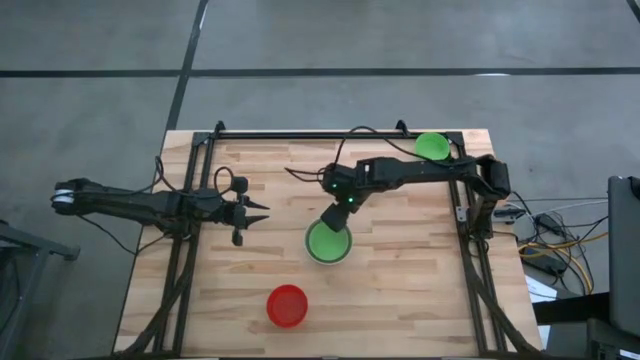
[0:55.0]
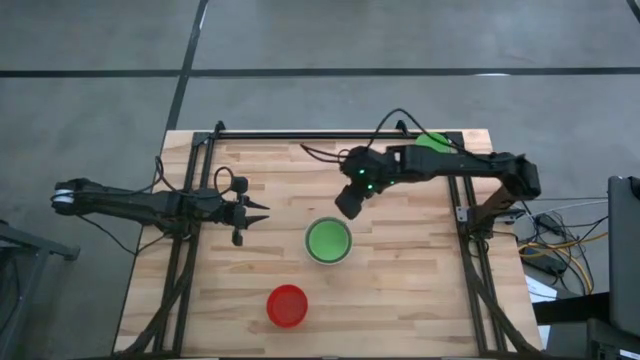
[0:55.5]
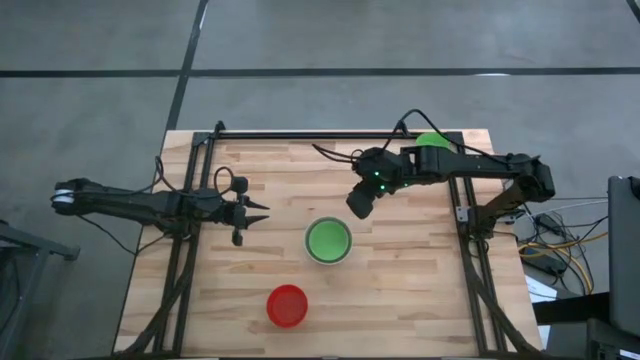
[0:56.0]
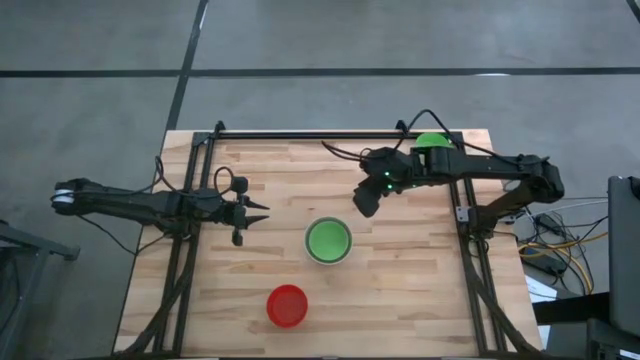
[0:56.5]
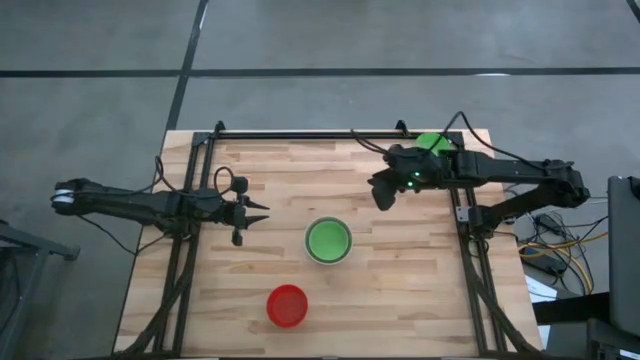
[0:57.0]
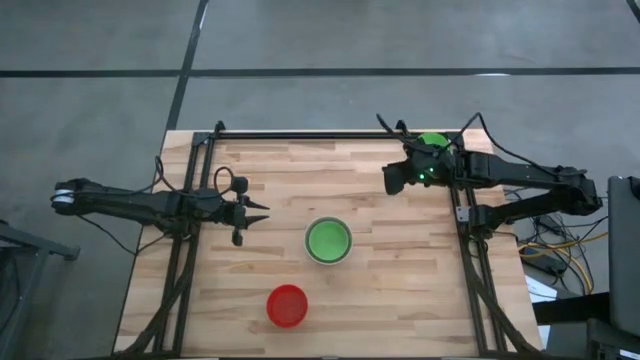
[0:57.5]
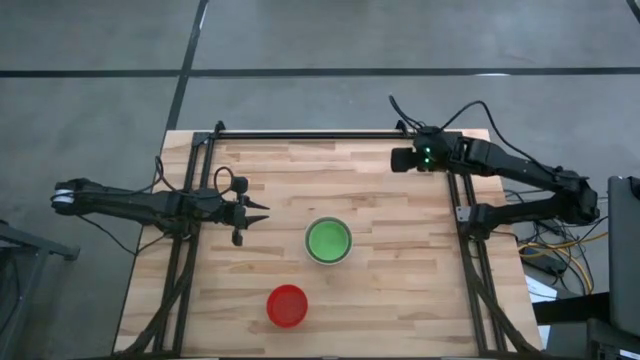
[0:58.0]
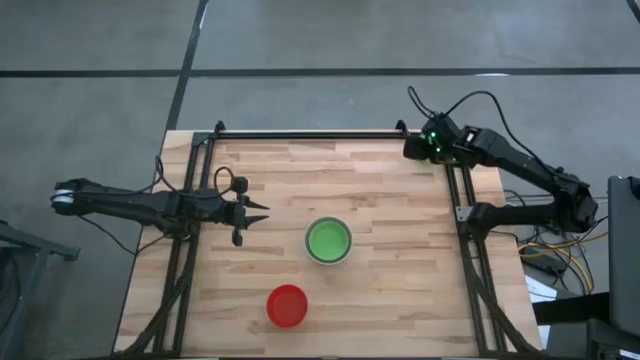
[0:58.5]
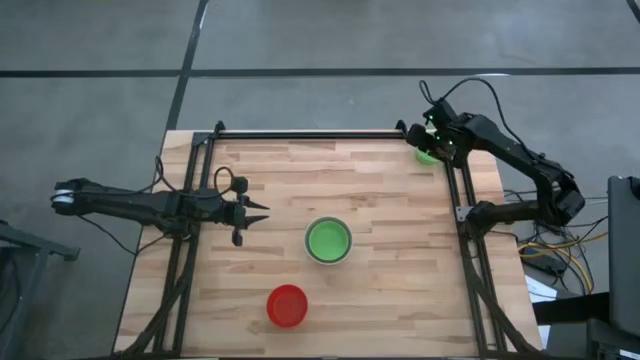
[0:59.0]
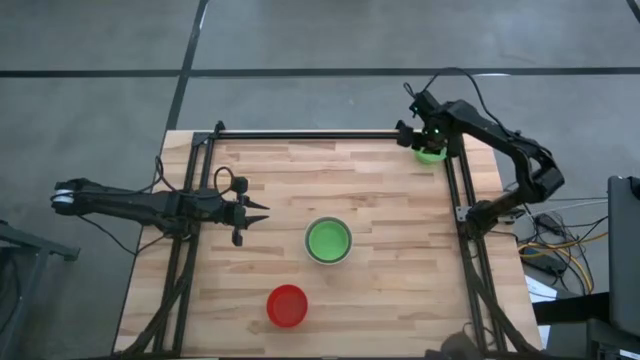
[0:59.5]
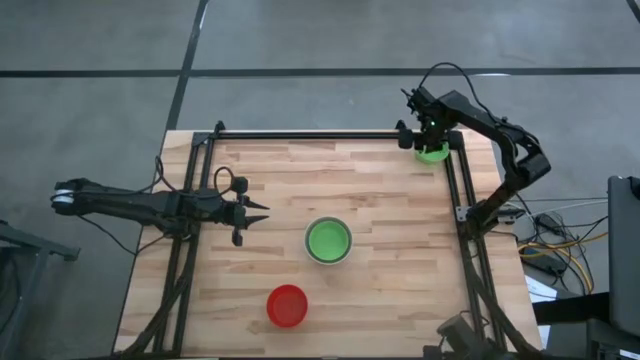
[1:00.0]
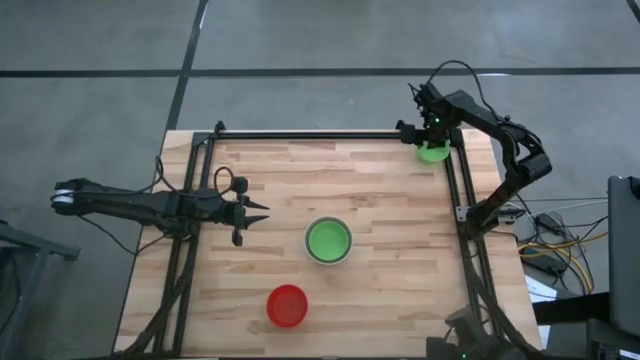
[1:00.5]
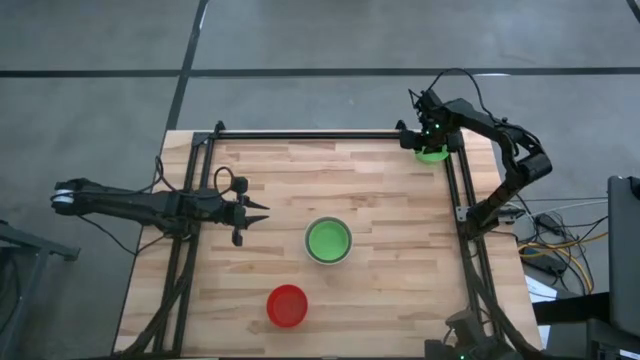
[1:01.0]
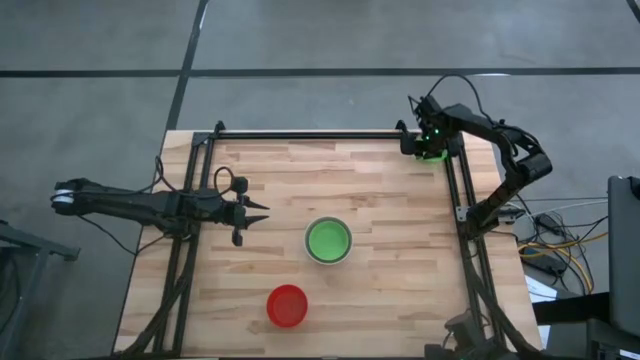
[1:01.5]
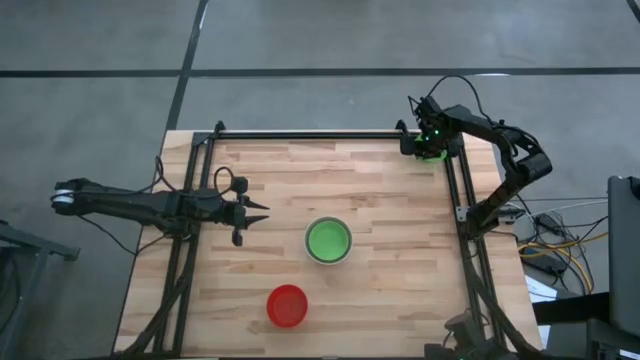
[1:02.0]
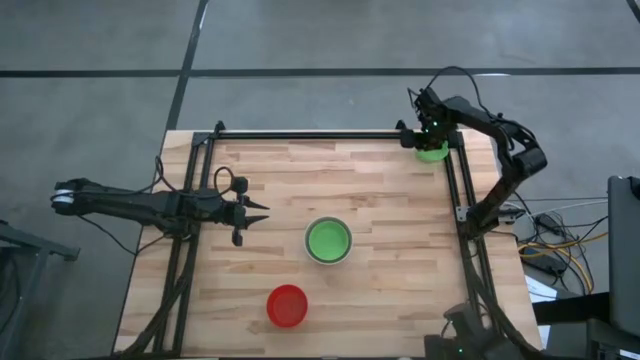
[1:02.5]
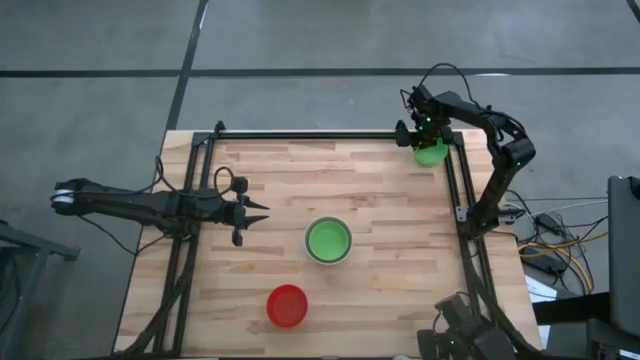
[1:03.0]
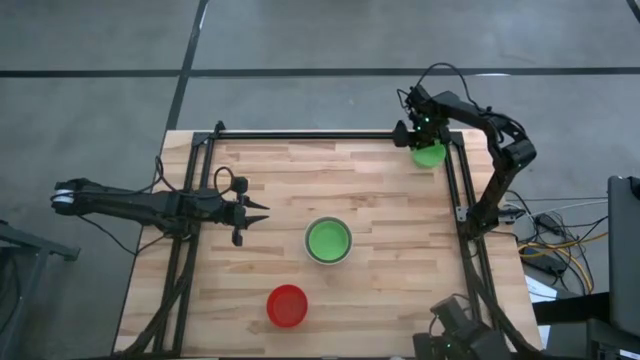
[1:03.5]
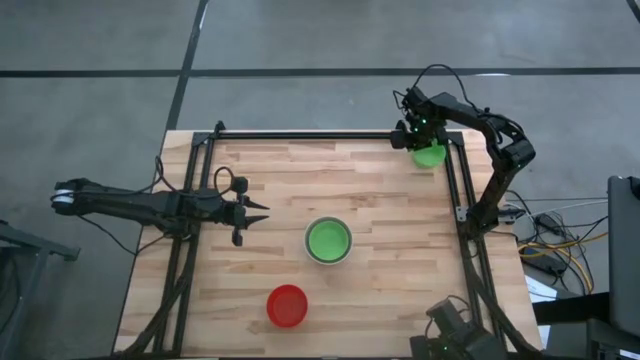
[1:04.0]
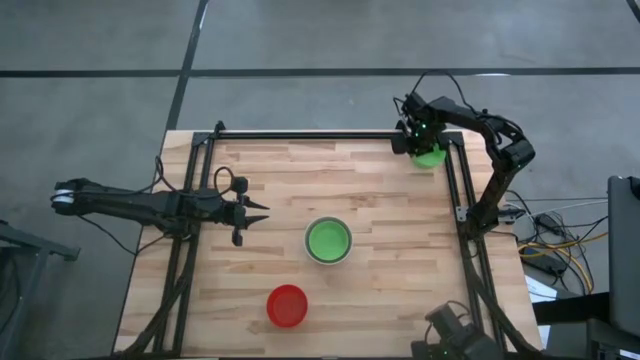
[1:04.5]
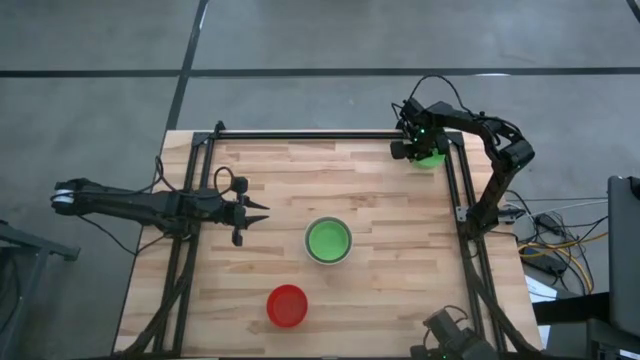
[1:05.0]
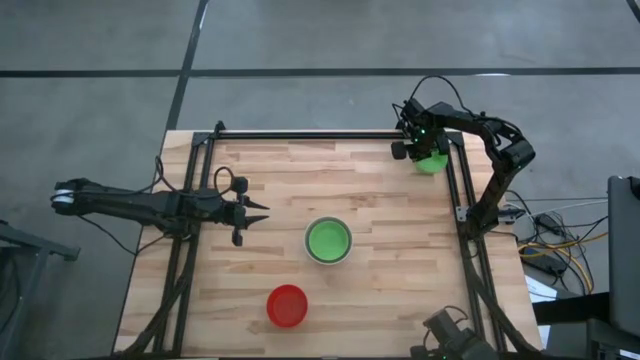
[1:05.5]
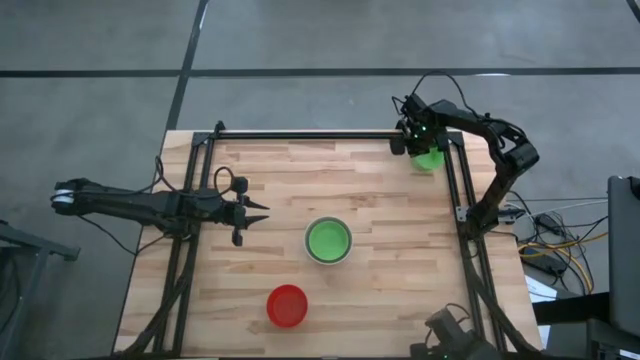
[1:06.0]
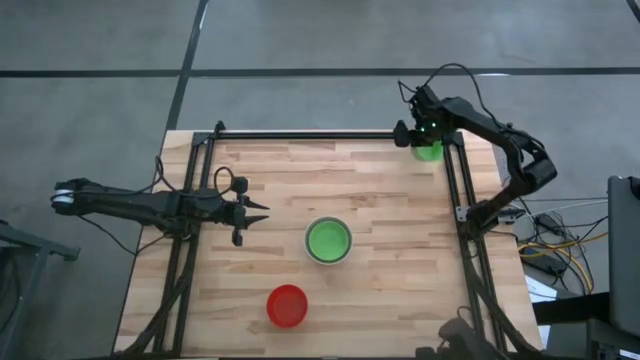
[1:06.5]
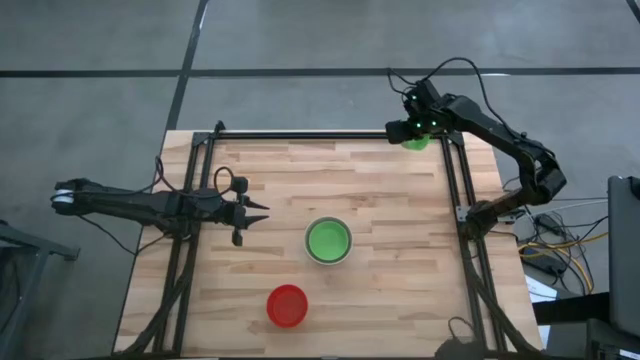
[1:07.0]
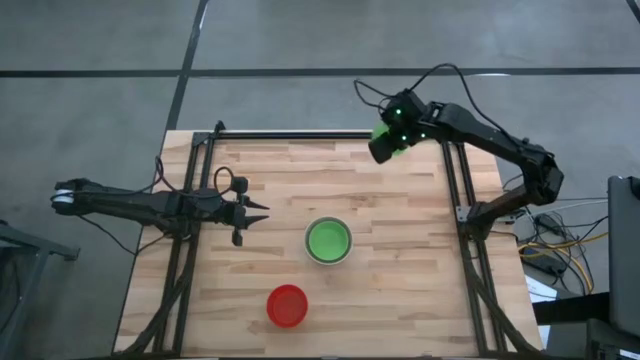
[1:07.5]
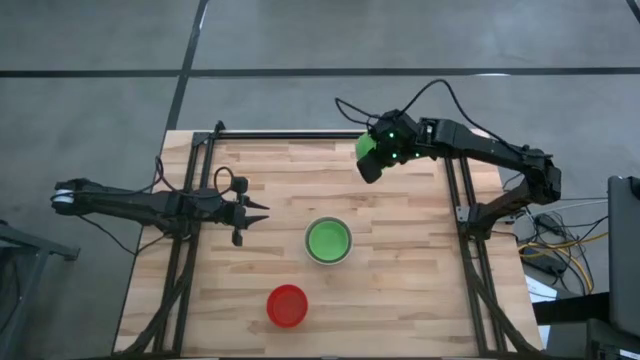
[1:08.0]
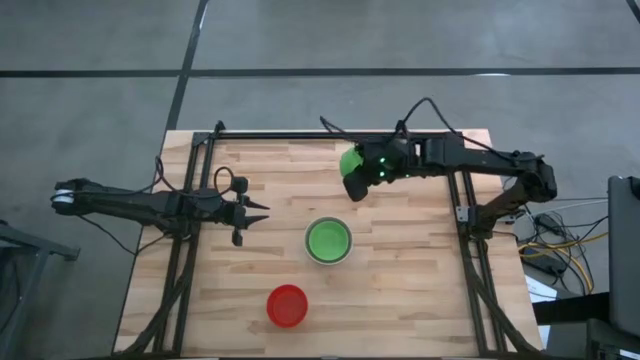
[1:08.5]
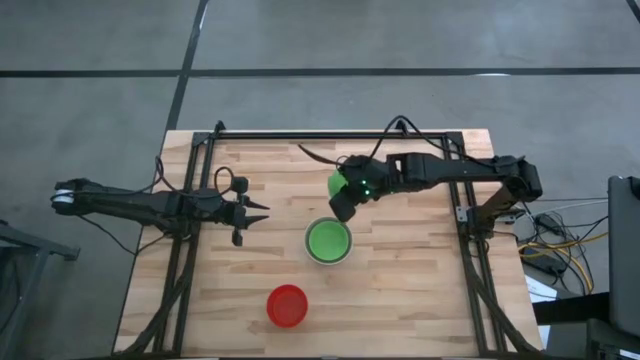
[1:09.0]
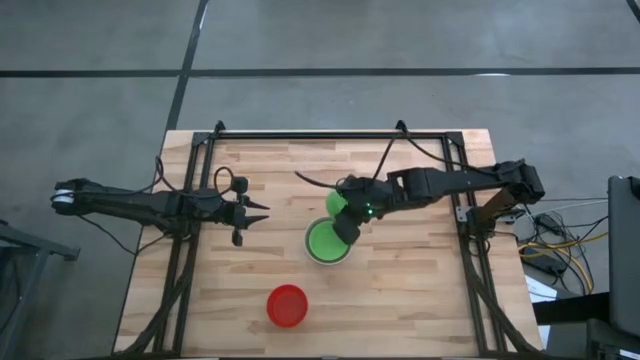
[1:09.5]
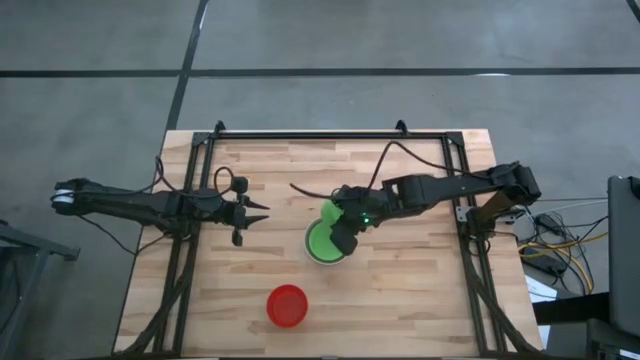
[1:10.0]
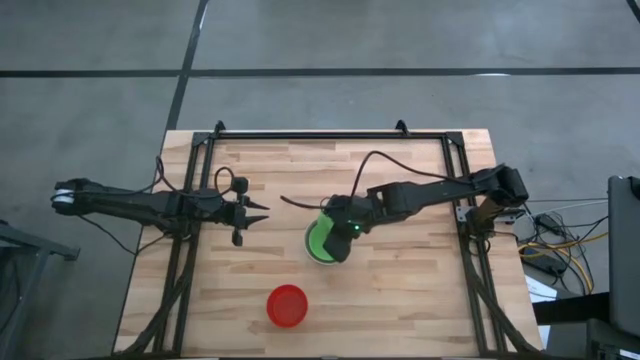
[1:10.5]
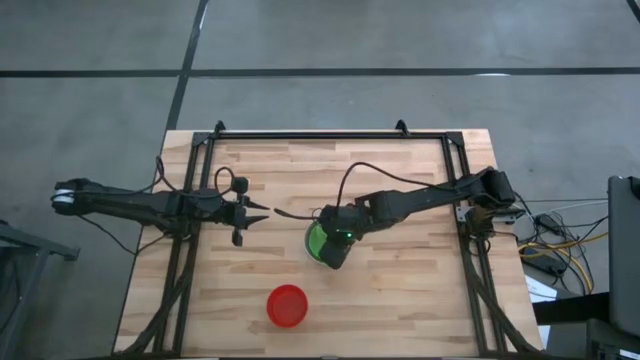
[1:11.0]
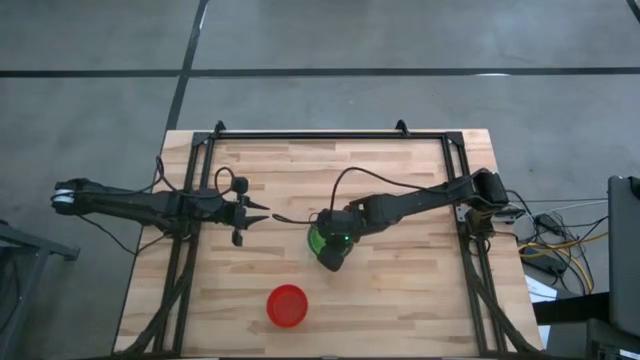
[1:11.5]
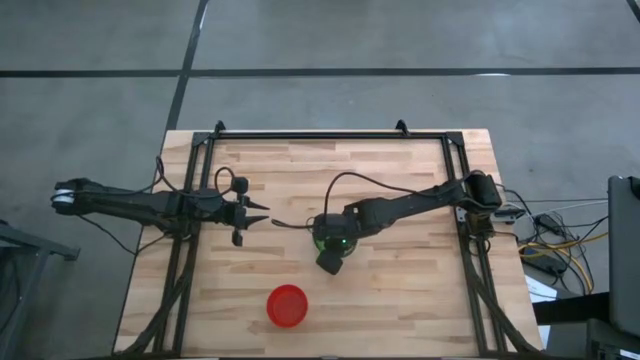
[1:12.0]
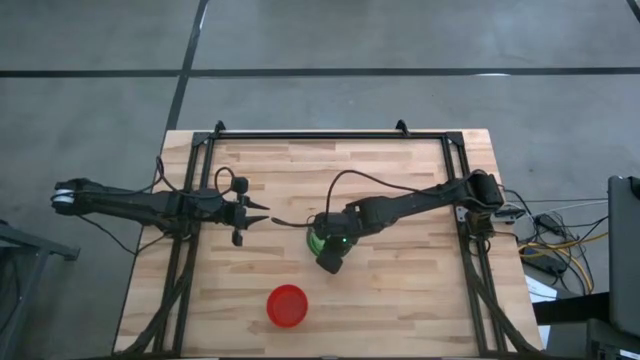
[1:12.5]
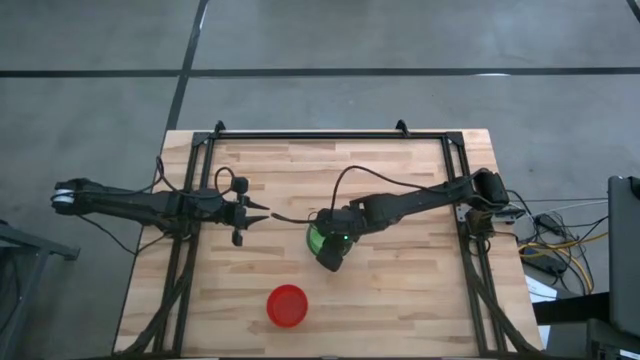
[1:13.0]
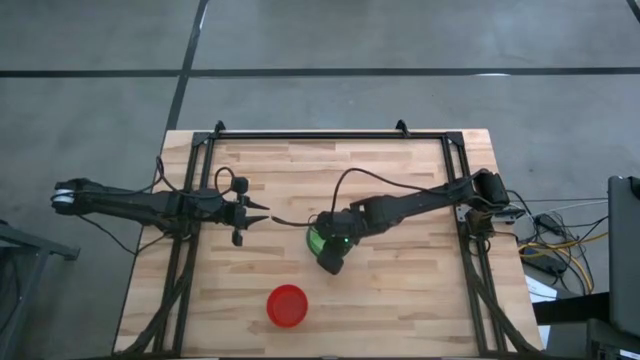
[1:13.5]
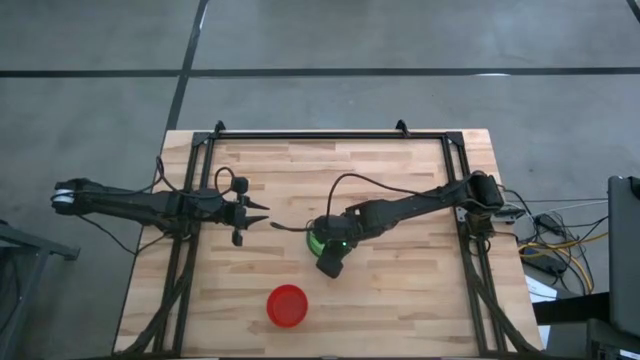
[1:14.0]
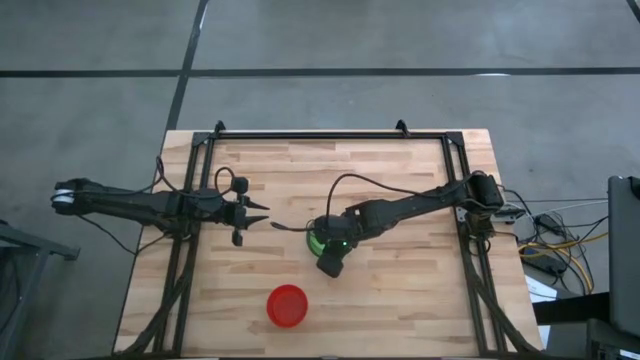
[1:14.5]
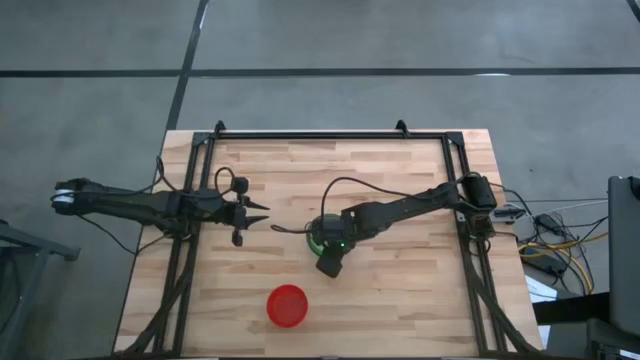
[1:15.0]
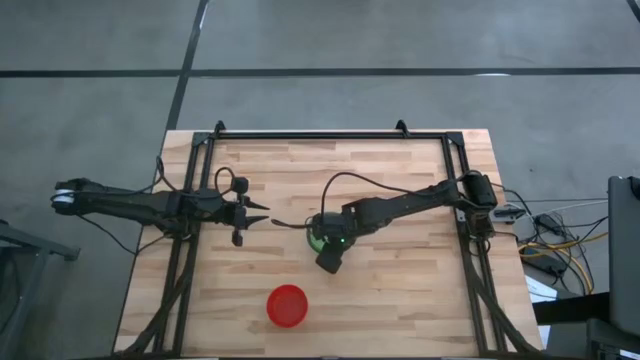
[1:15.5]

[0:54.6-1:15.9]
Stack the green bowl on top of the bottom green bowl
